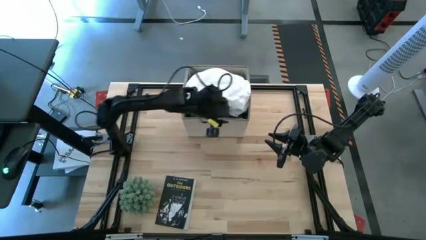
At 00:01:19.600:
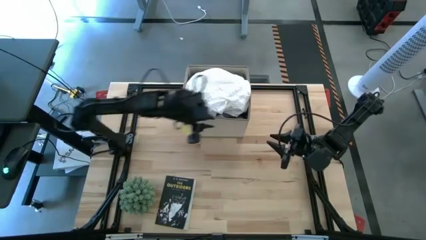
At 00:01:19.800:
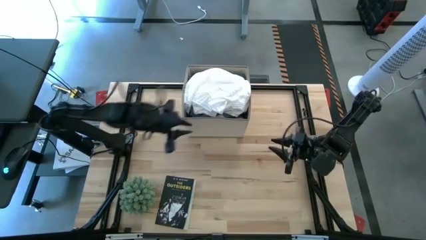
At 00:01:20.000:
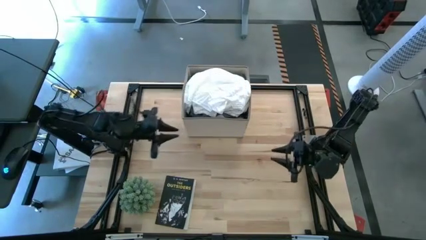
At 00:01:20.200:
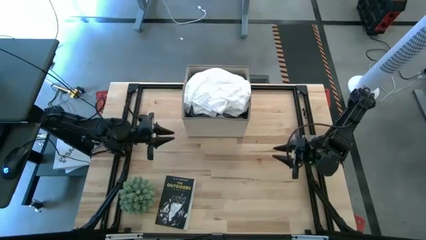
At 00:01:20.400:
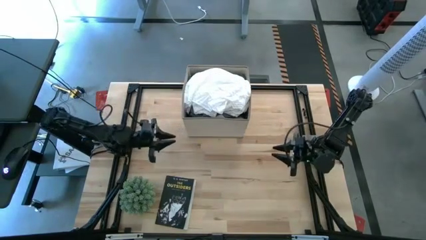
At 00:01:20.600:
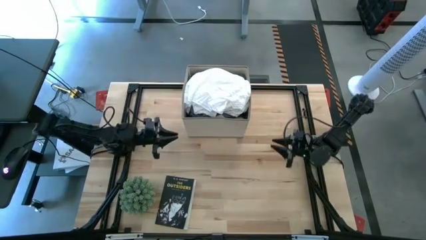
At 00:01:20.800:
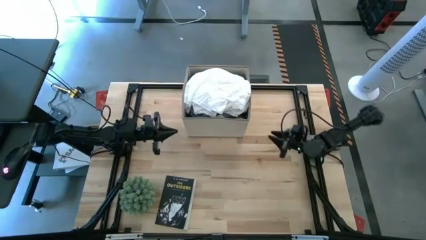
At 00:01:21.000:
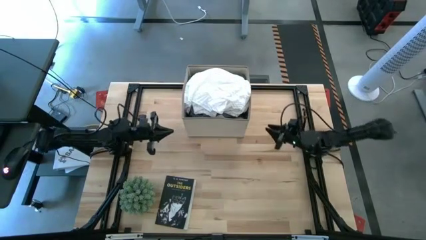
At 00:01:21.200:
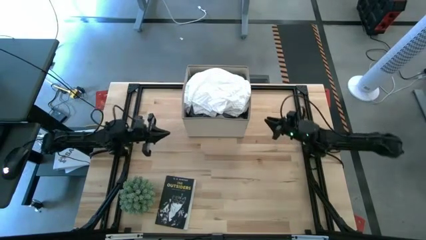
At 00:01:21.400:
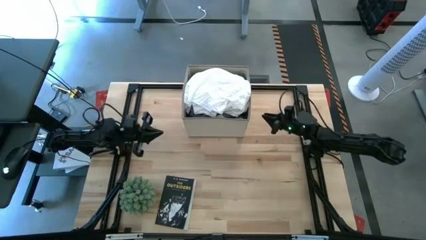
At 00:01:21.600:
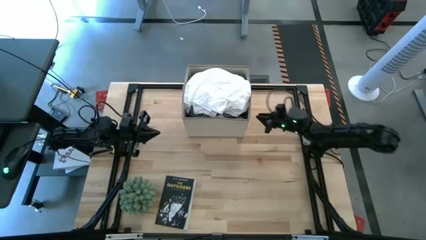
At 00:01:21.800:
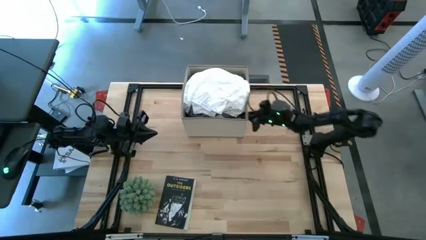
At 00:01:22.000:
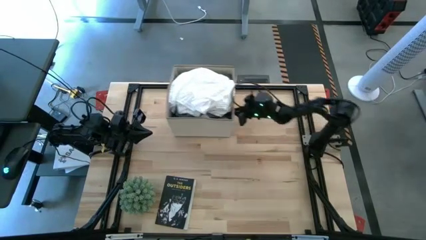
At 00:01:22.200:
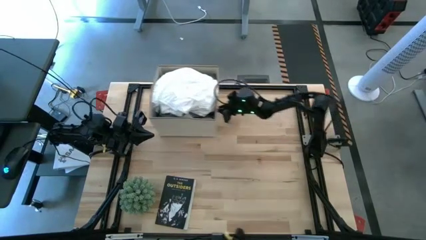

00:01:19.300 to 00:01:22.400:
Task: Sort clothes
Move the laundry organizer to the upper left of the table

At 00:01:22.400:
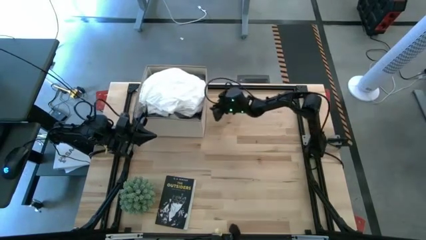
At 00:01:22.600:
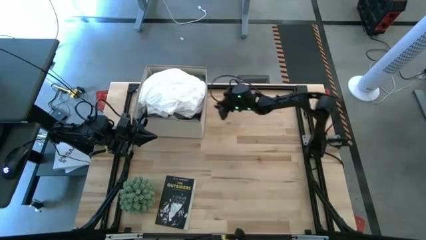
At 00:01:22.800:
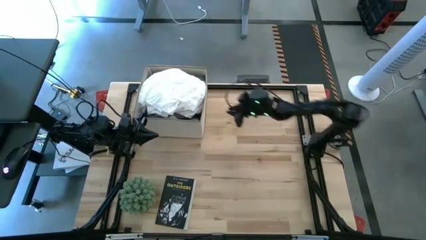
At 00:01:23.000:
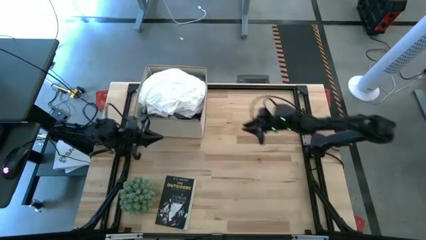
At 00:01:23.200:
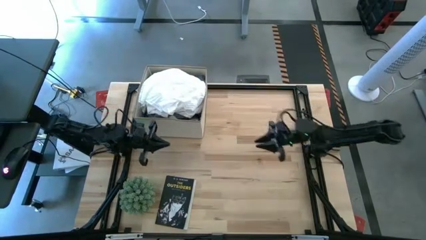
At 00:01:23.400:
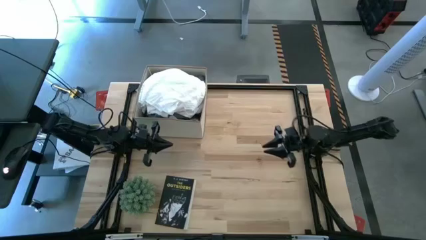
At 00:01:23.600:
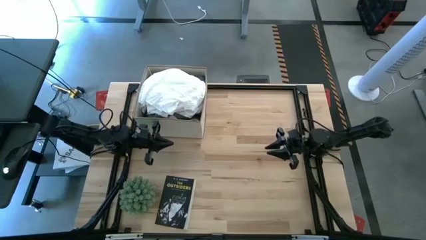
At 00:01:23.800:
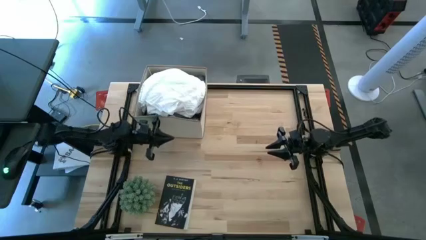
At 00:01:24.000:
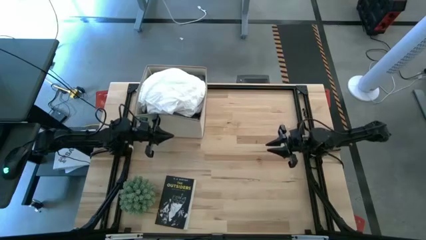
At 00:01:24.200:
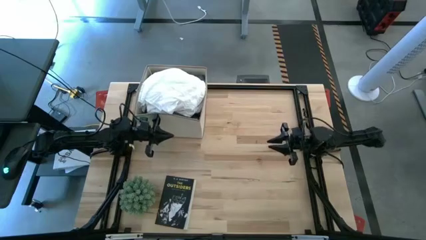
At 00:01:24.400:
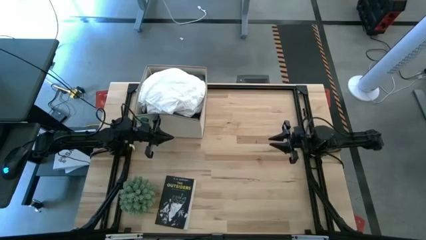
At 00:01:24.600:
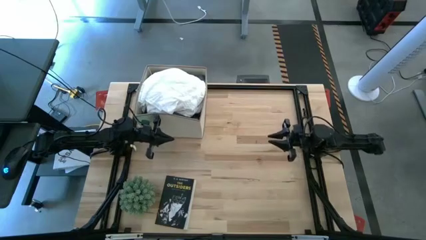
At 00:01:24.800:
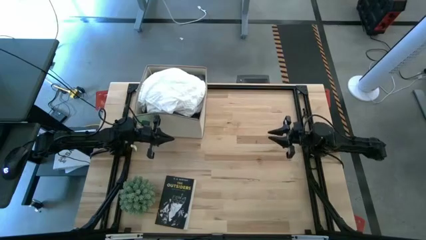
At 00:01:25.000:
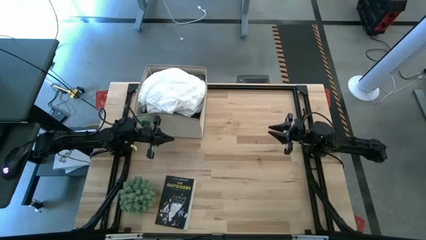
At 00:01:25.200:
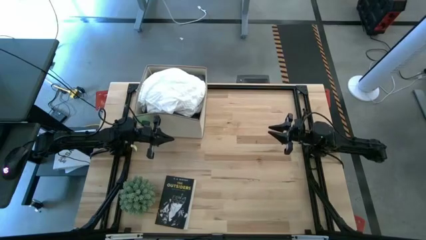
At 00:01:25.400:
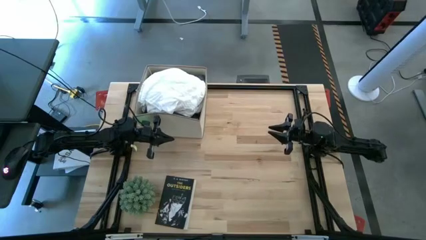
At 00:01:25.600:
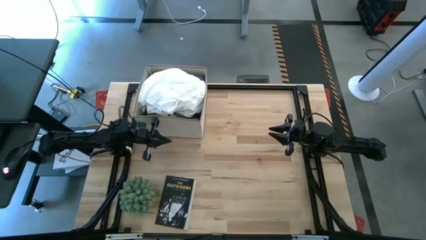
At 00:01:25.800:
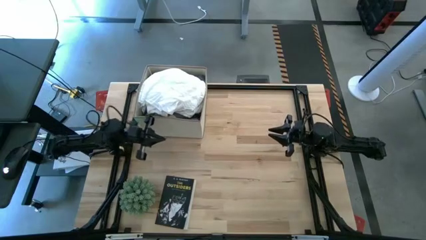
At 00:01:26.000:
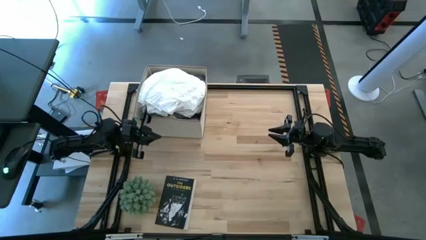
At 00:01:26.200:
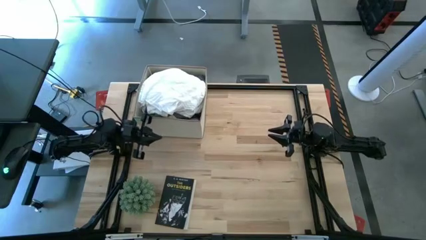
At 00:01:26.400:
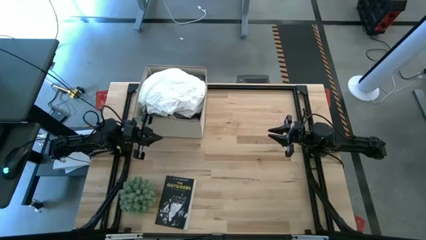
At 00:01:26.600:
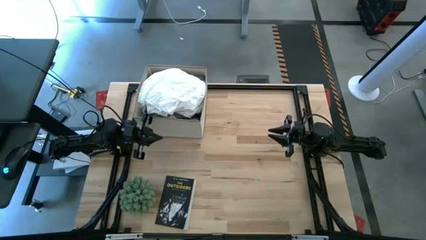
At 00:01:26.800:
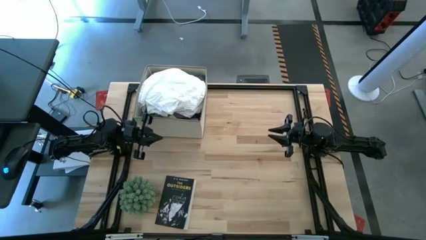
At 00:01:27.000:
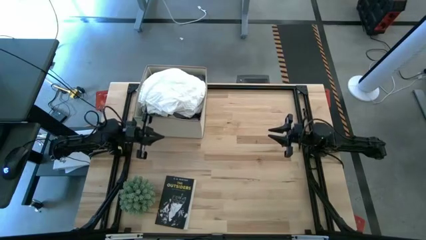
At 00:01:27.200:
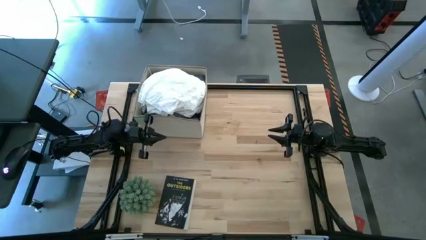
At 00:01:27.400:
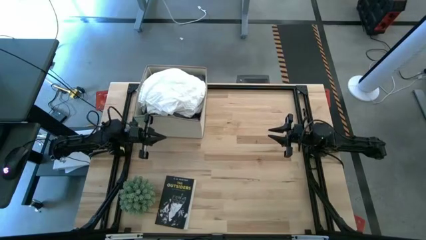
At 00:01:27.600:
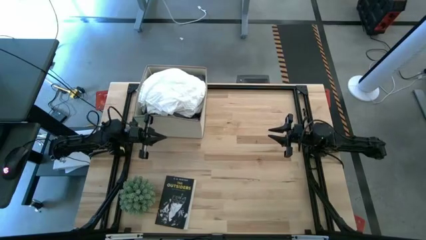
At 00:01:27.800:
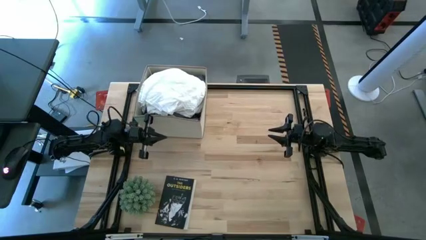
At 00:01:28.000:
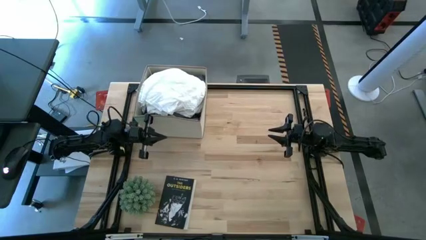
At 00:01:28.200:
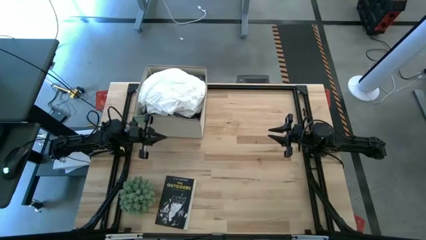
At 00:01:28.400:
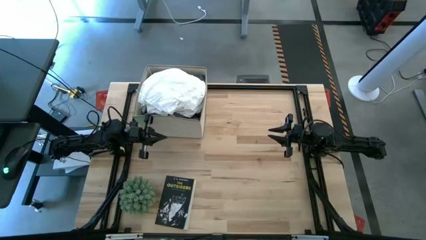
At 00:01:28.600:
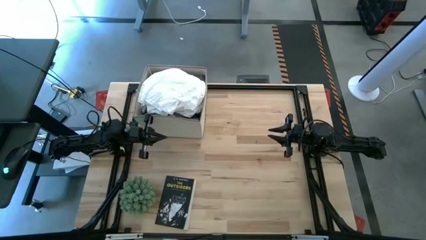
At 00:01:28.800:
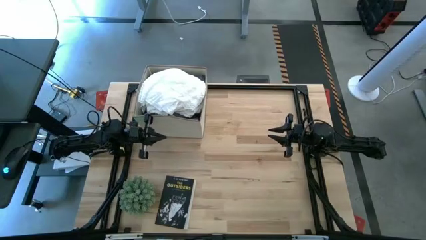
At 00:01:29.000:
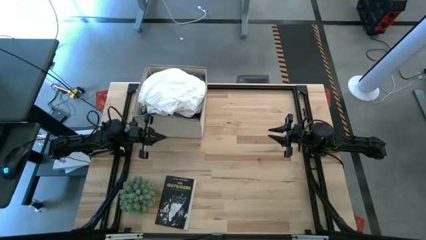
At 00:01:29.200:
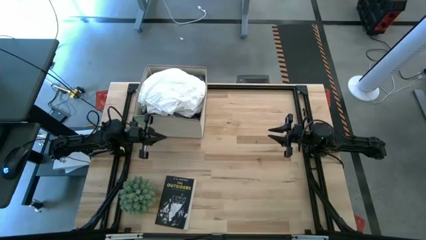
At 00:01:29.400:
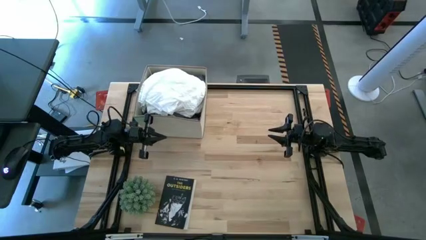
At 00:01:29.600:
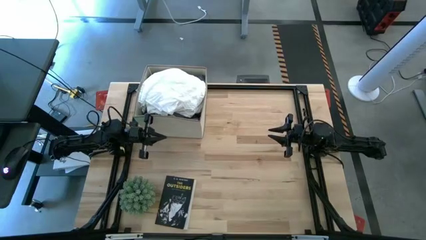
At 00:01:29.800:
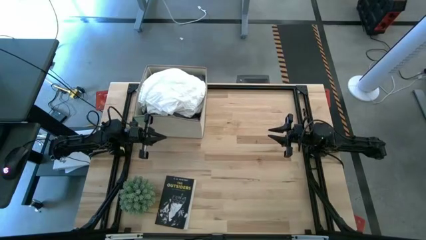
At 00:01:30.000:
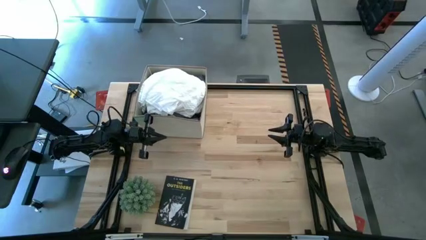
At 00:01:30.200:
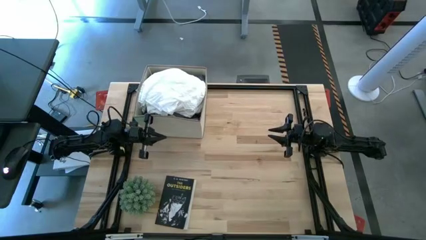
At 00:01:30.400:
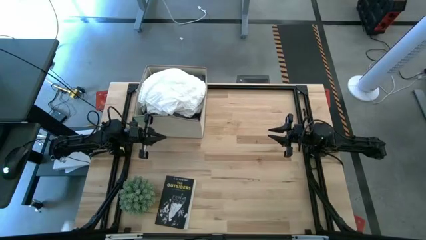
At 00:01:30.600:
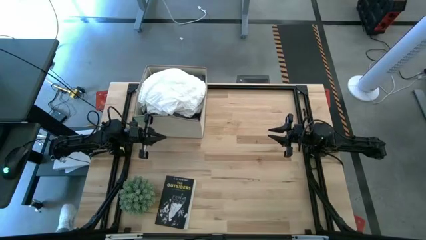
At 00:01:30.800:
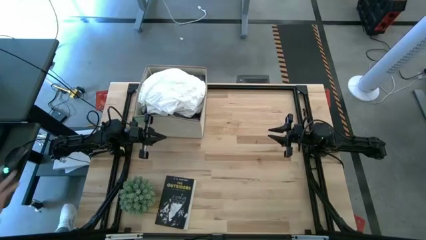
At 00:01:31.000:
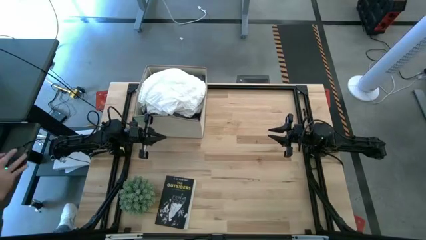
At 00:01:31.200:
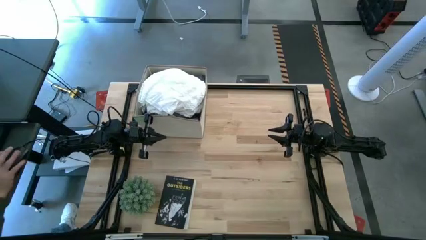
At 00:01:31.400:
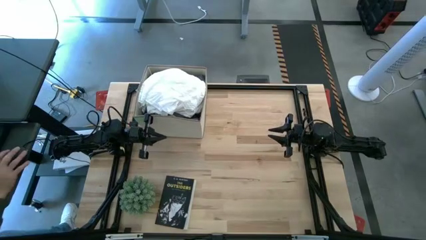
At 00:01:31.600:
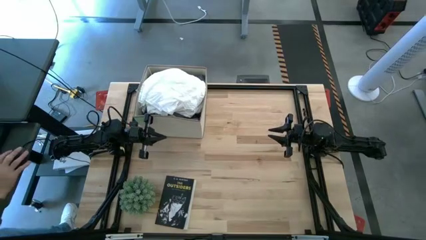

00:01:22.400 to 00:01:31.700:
Return to Home Position
